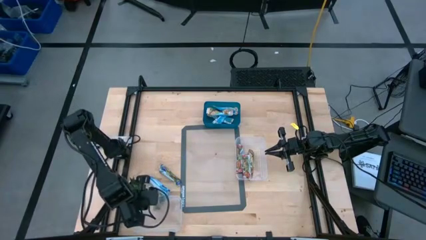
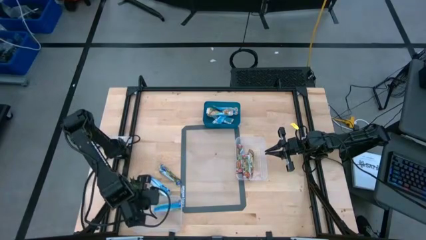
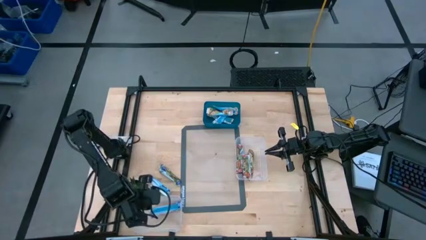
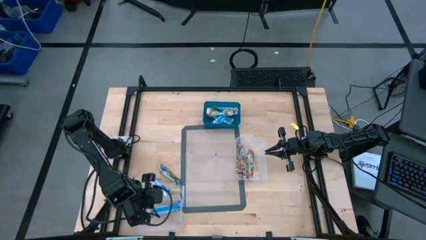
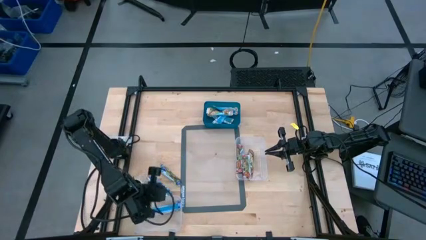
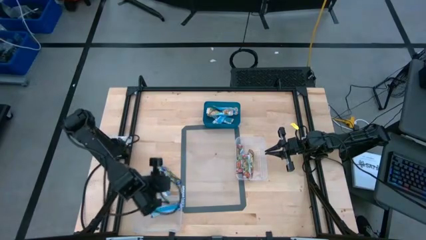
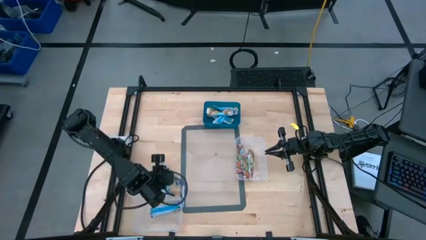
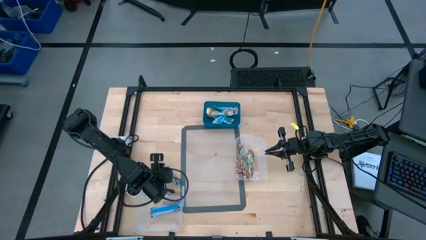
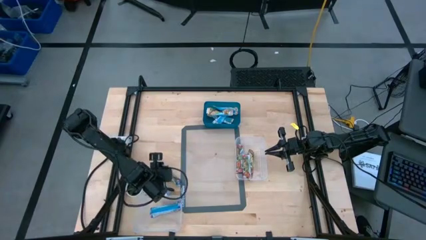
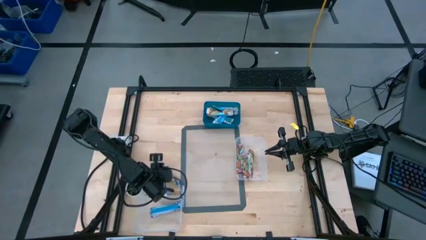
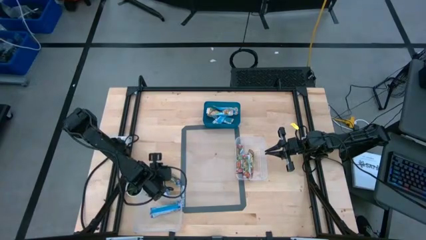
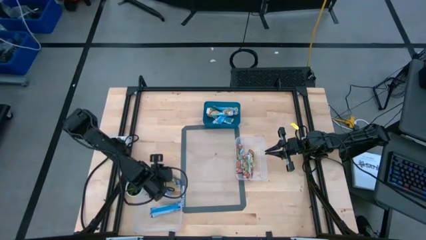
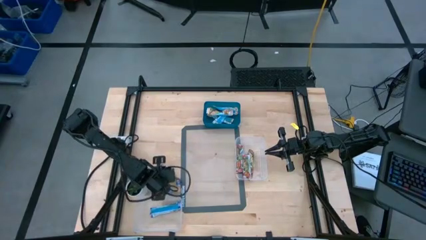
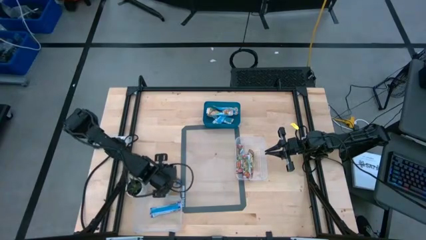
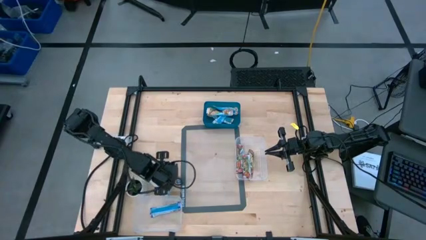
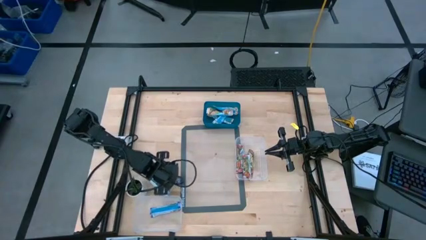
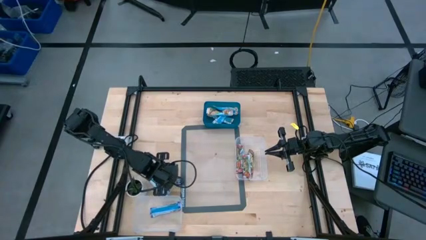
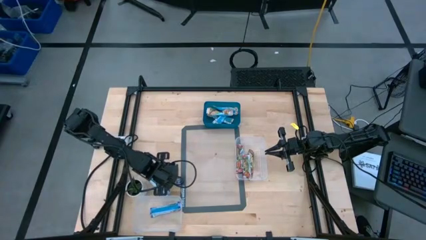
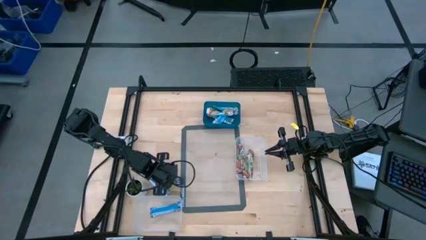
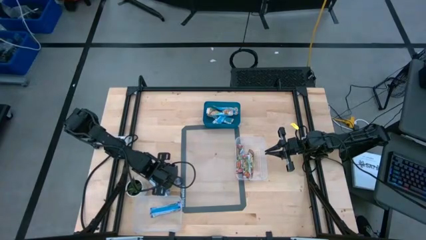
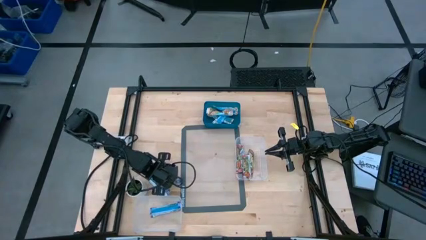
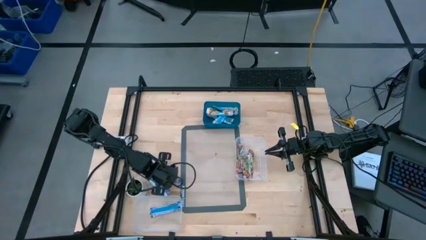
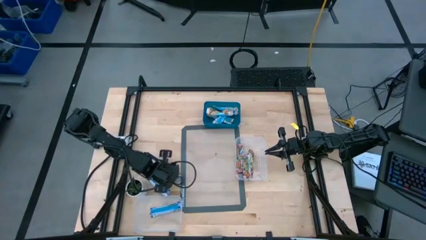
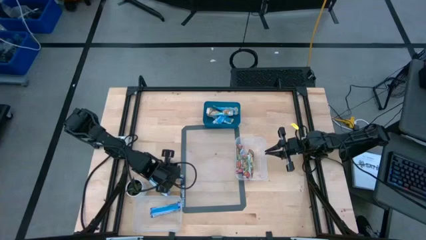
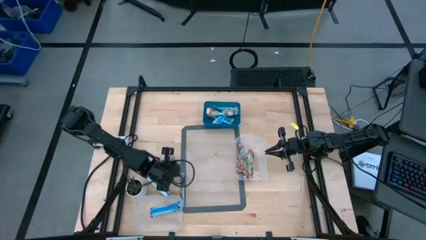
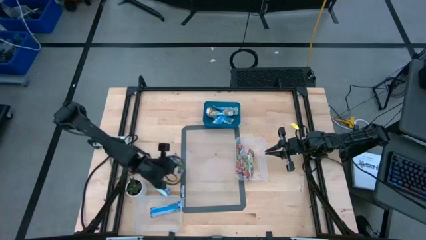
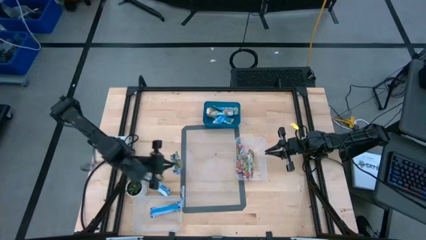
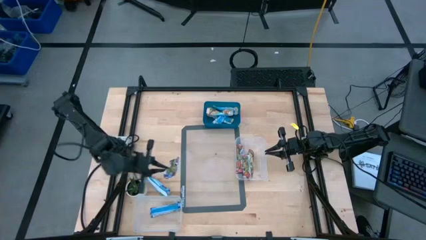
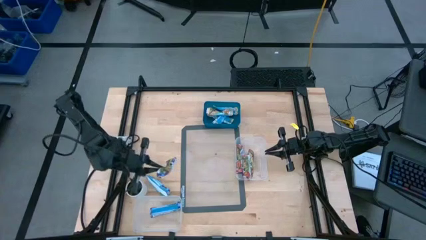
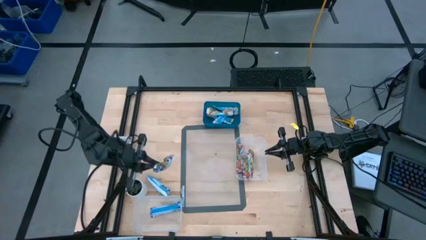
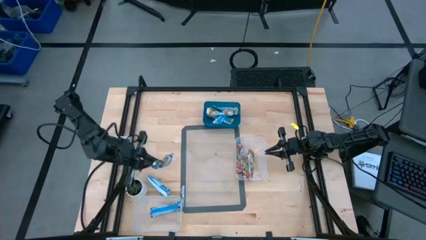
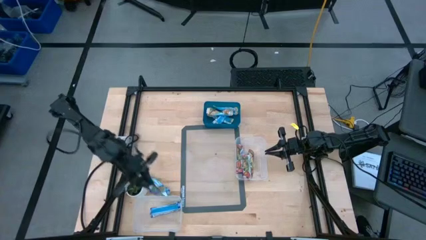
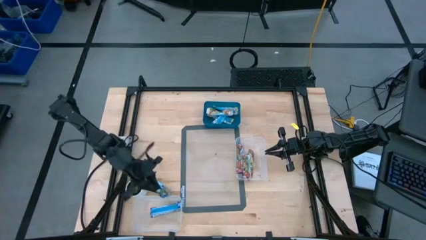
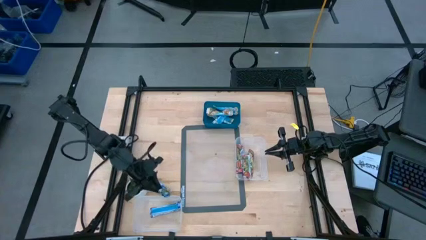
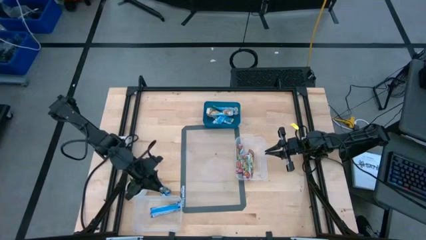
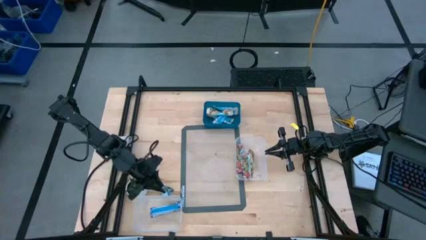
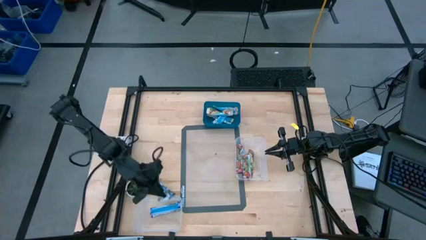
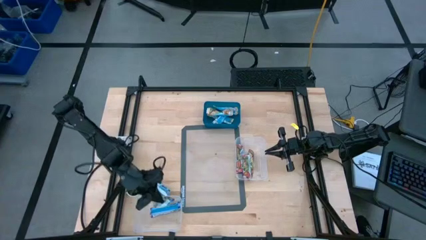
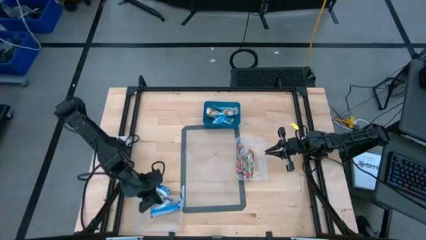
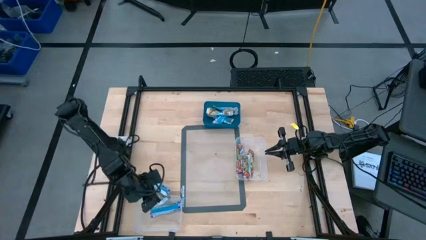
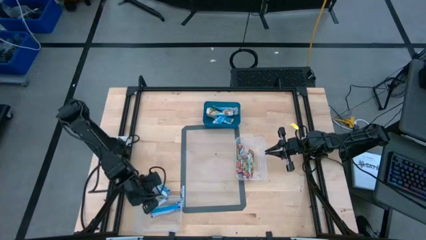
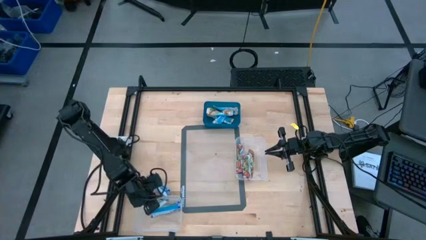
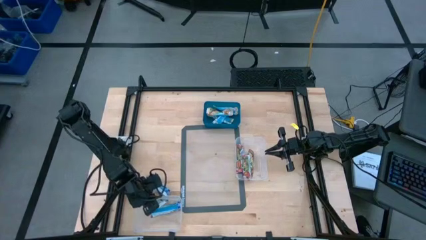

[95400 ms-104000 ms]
Task: Pick and place Granola Bars by type
Put the purple granola bar into the left transparent bin

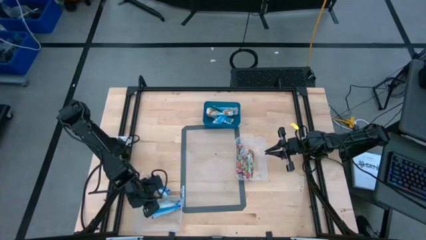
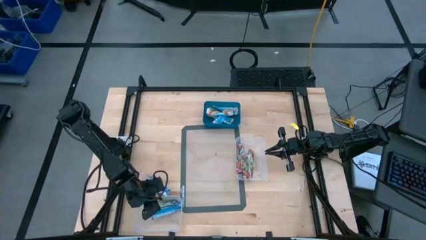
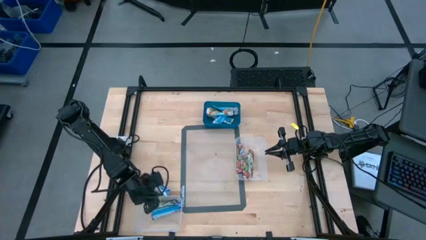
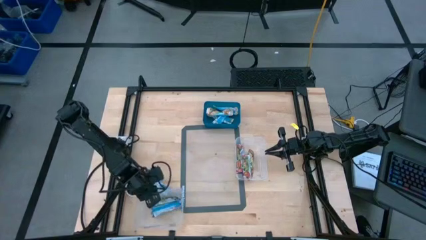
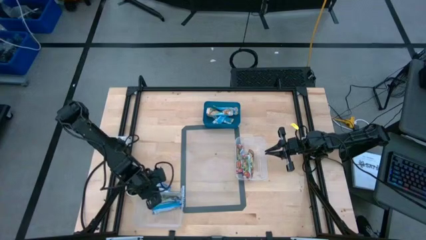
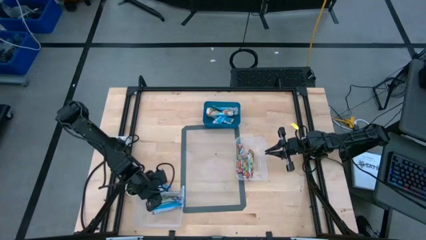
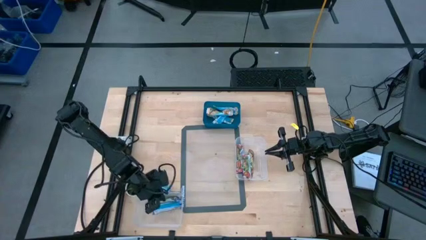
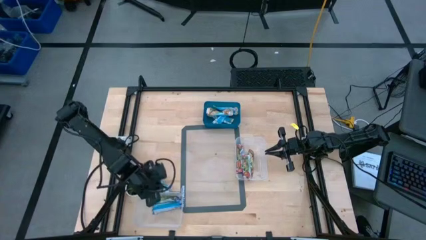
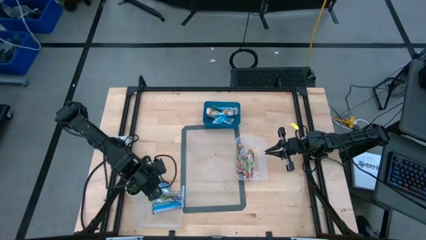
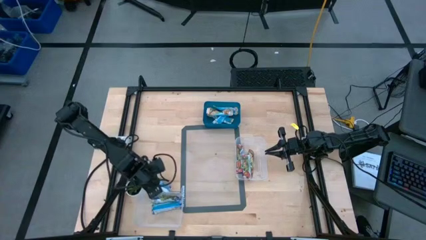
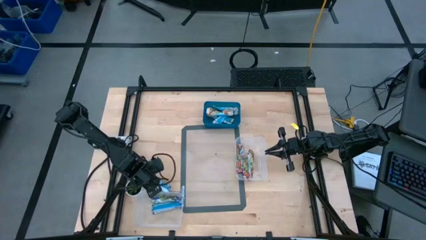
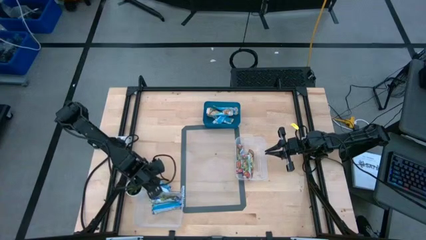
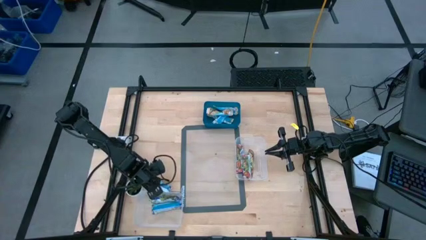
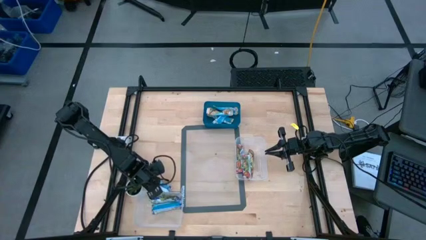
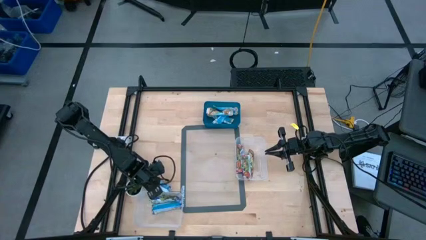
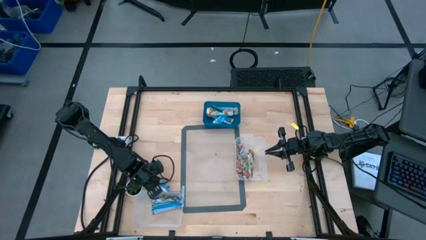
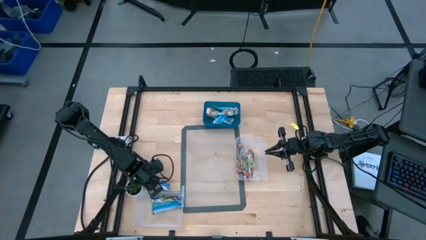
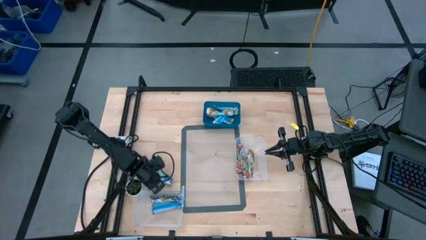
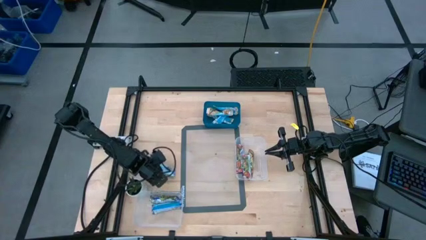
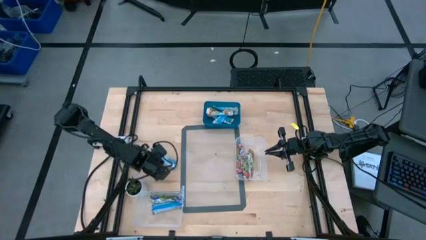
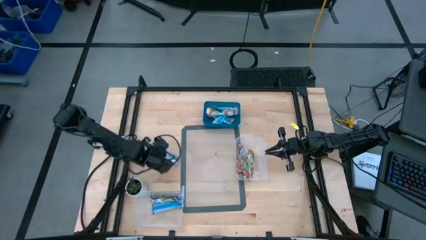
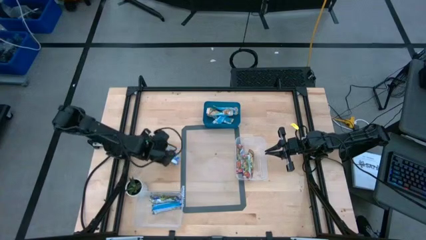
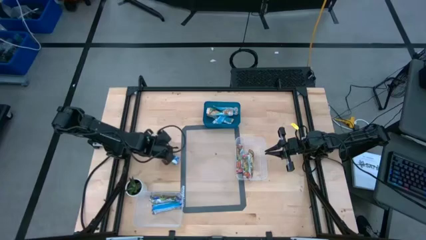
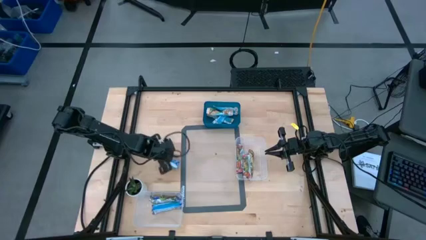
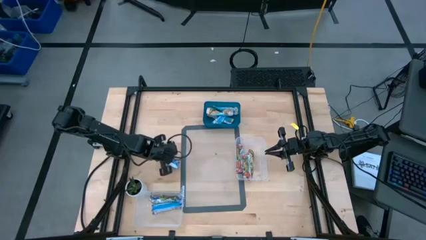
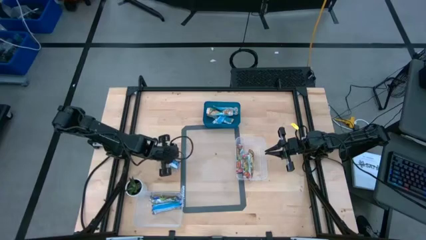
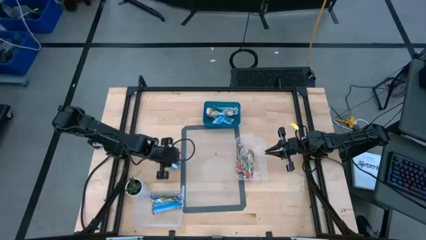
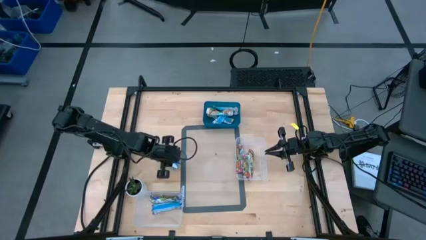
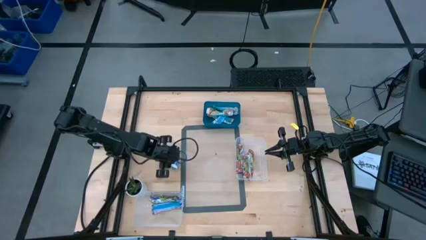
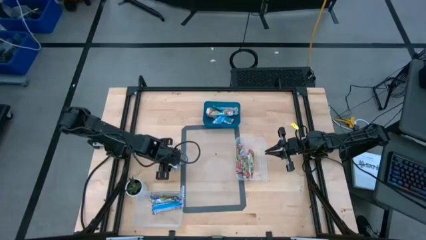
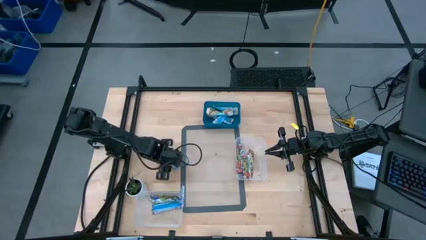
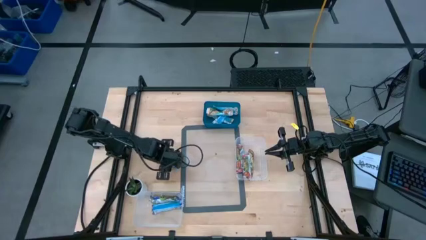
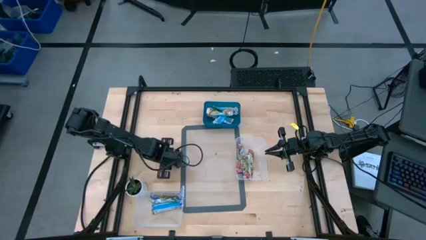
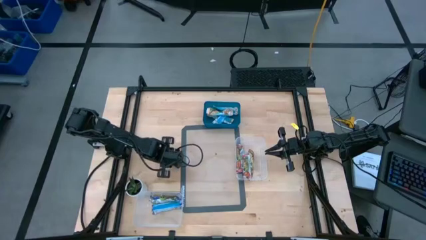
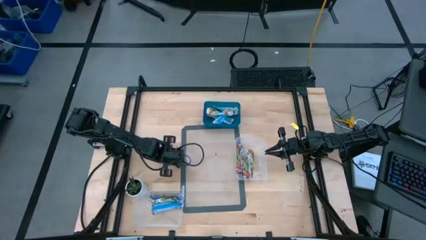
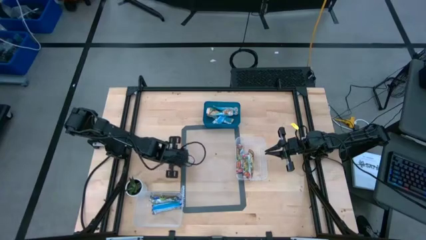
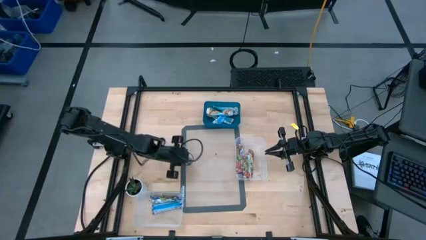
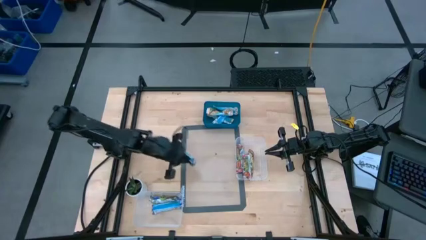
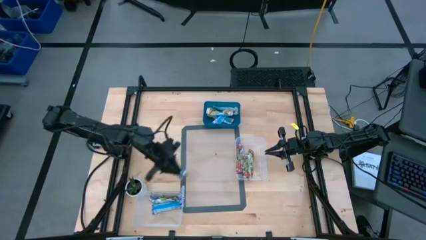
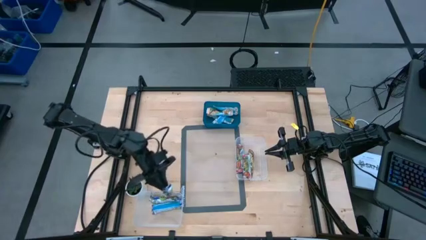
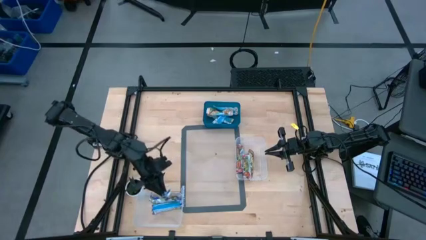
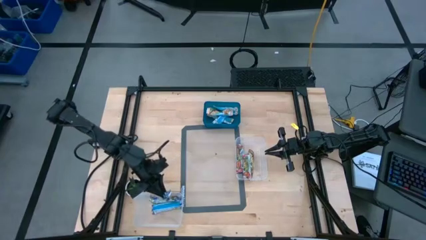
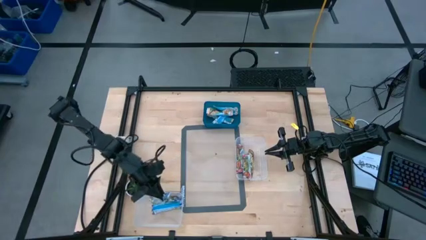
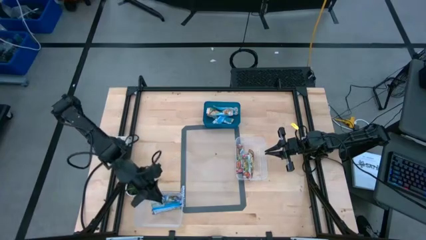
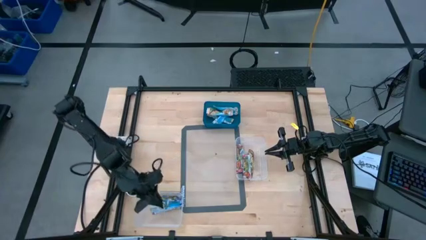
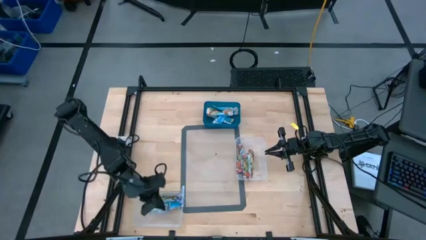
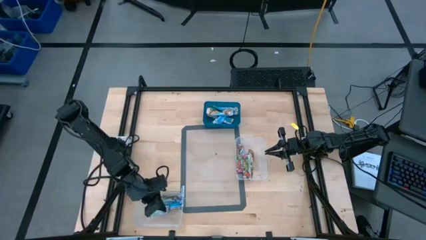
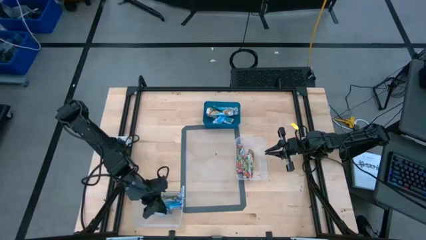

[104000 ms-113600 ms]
Put the purple granola bar into the left transparent bin
